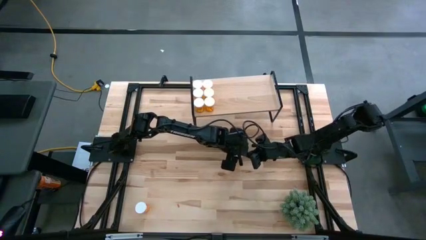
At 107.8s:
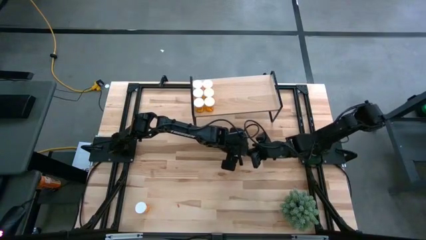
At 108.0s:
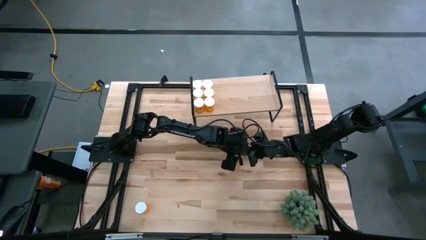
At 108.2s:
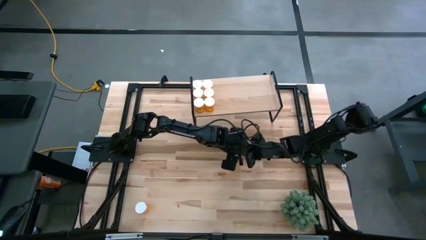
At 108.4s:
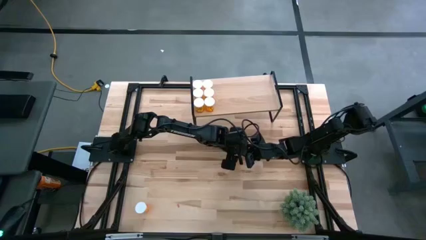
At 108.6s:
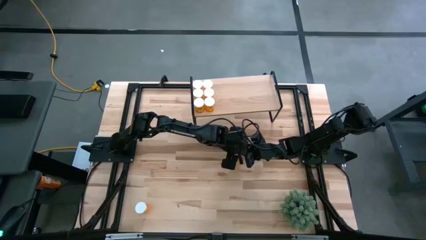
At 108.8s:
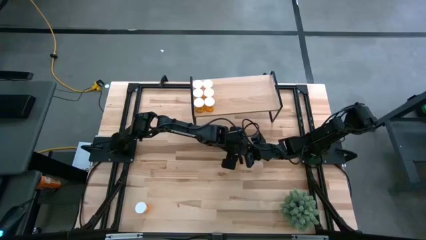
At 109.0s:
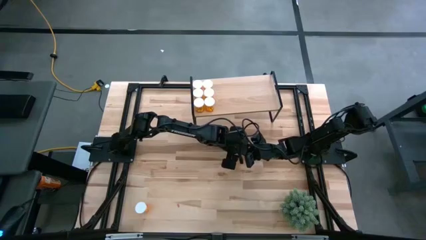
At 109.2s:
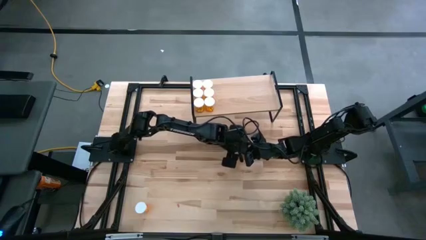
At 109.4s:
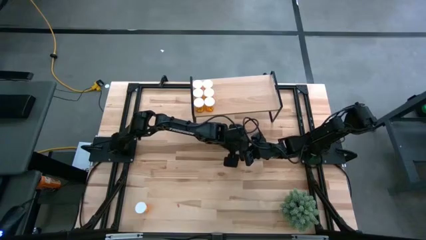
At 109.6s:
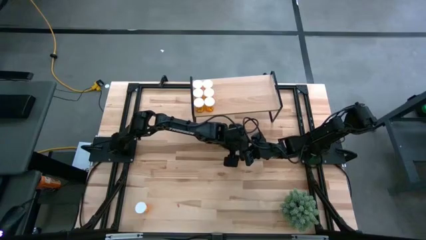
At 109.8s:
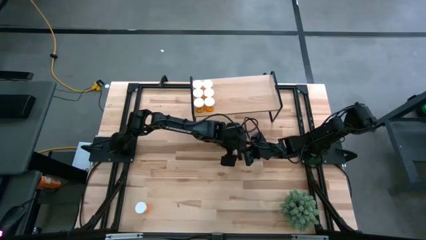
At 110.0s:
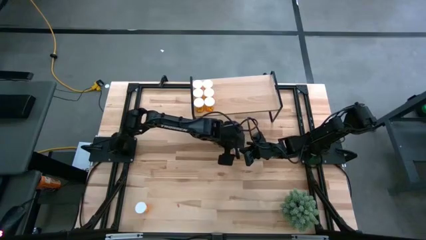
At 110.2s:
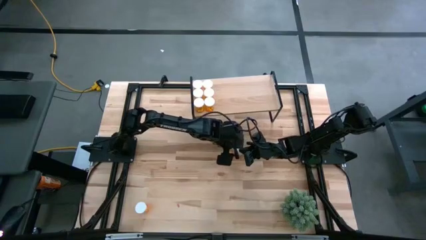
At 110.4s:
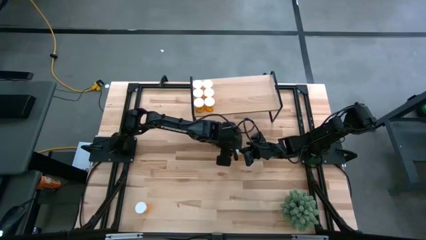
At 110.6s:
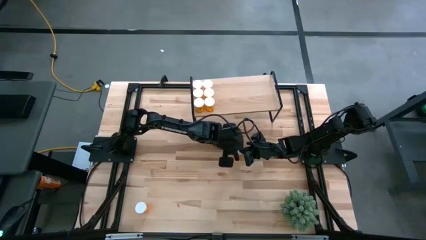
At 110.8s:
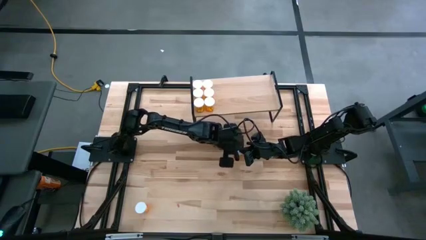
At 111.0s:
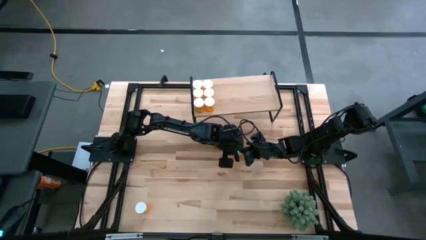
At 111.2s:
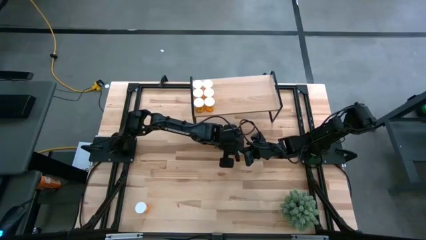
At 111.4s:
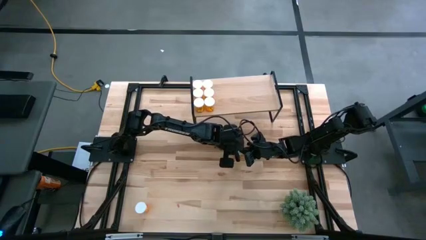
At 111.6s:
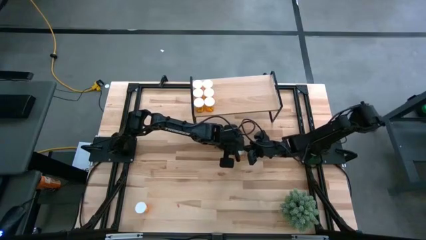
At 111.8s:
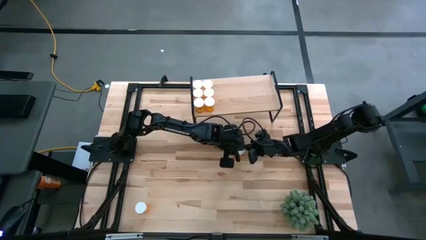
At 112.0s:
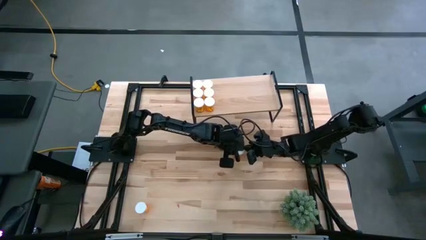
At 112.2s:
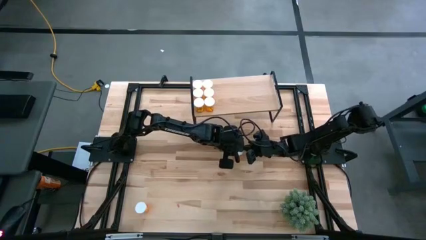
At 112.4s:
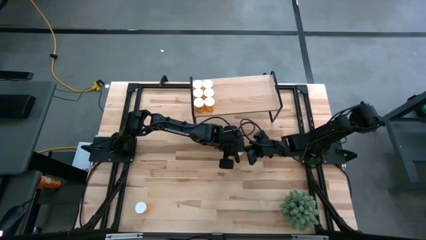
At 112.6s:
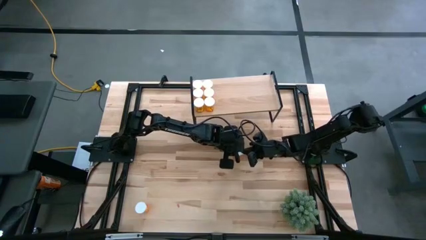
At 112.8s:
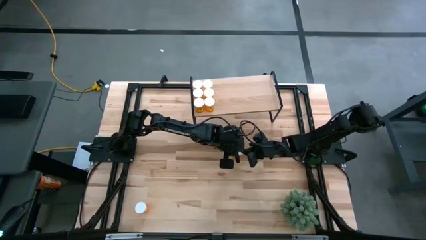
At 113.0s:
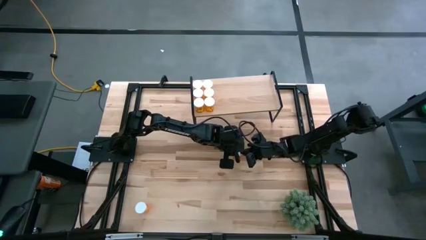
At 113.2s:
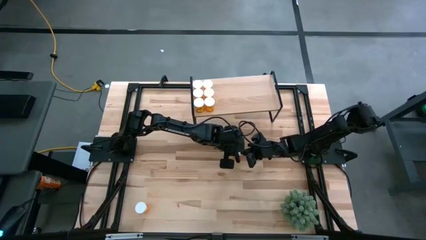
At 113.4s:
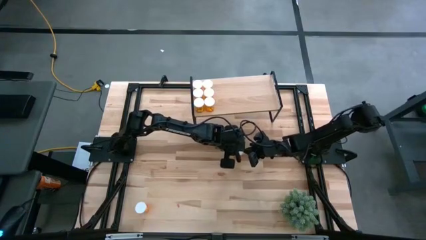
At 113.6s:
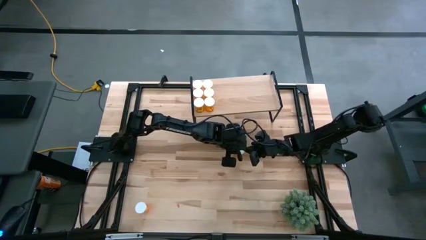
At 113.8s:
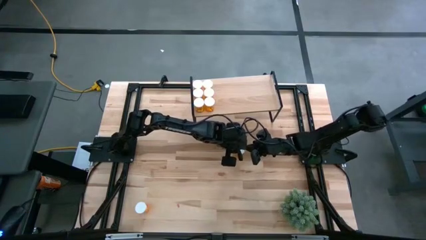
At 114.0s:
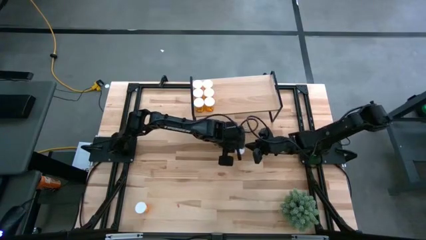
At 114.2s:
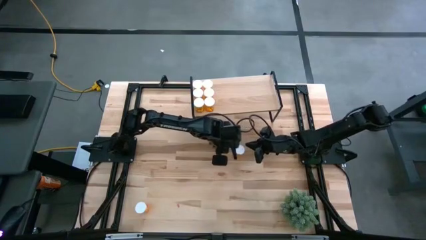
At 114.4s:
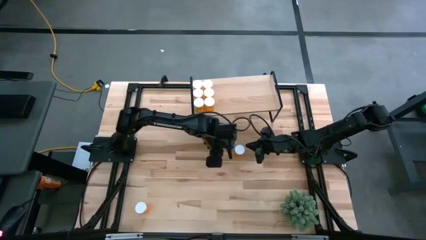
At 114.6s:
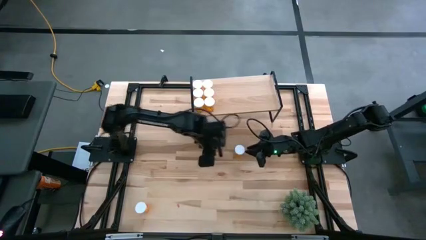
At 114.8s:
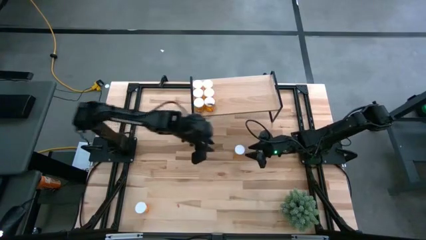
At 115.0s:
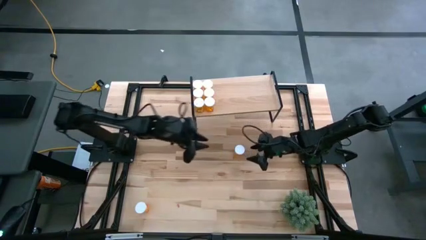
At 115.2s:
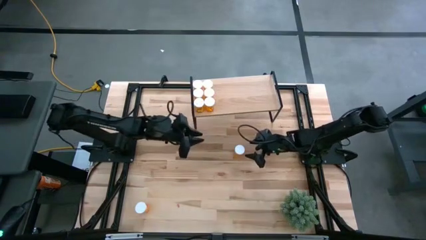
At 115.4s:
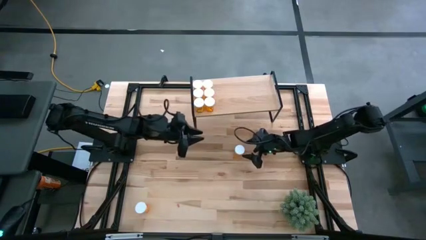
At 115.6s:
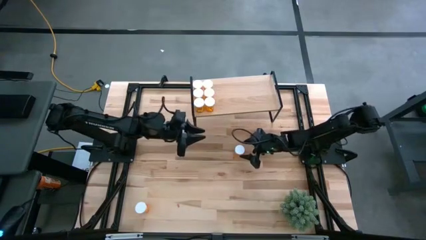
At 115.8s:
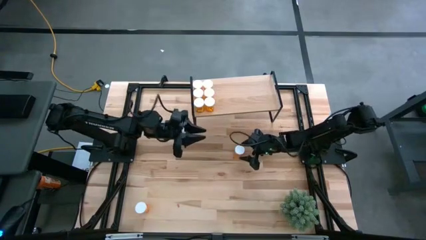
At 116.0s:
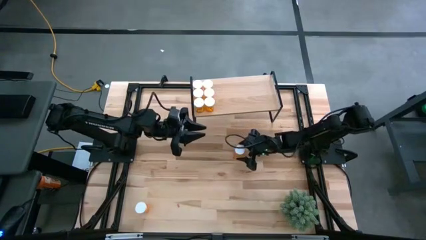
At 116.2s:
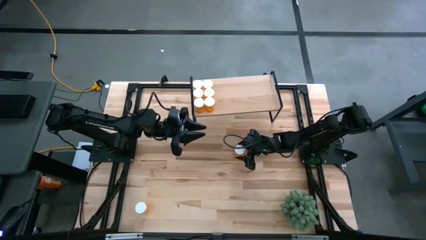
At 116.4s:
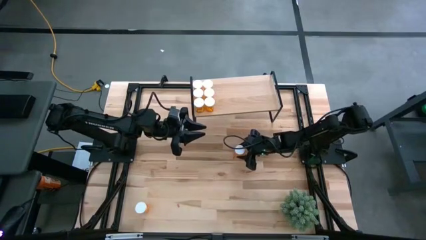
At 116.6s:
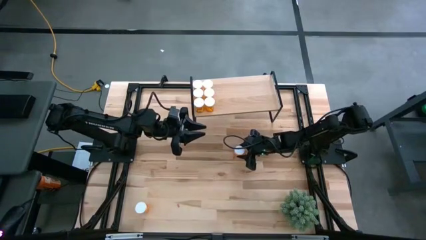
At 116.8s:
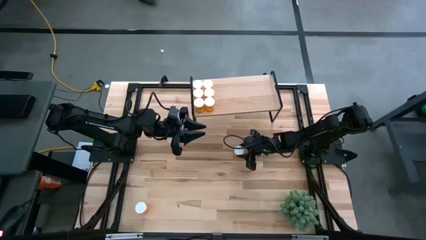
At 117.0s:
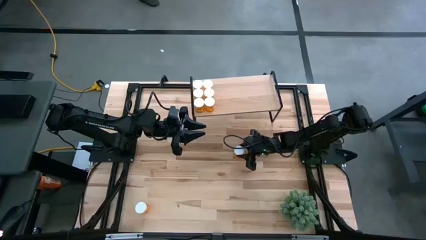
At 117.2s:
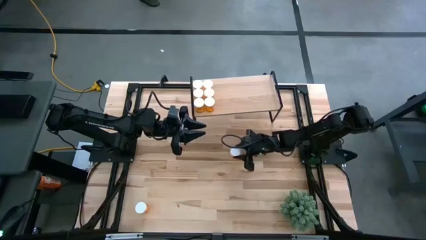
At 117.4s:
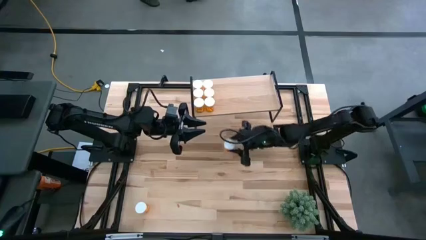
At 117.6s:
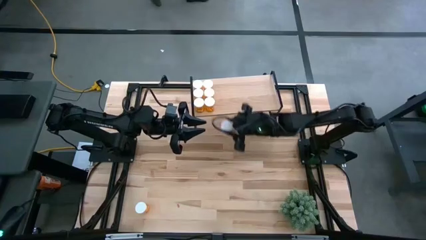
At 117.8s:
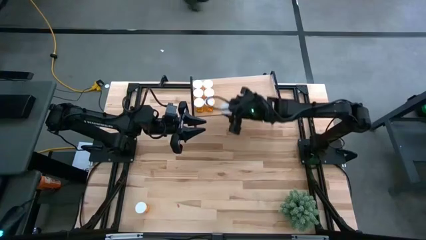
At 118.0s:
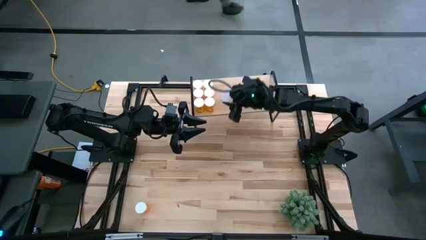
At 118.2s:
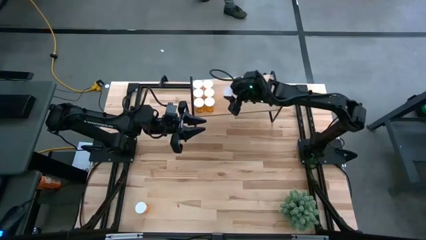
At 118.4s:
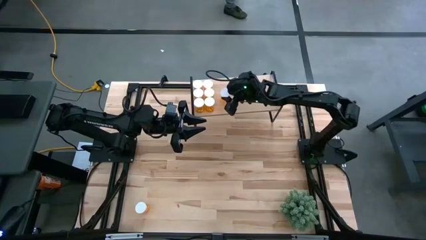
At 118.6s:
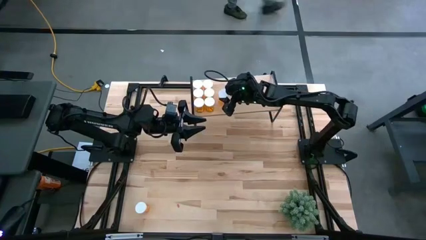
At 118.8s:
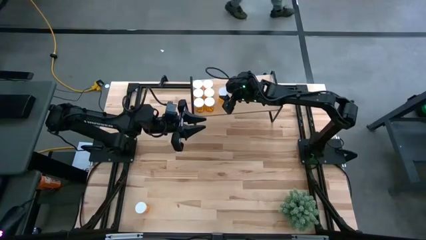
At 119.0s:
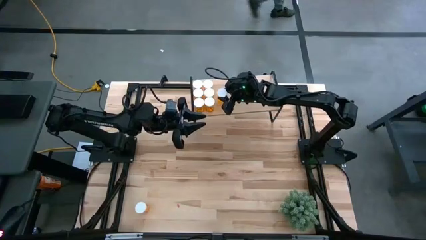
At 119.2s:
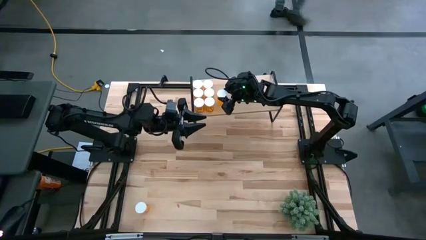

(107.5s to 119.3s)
Task: Pick and place medicine bottles onto shelf by color
Put the orange pill bottle on the shelf
